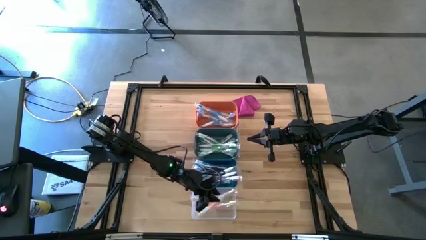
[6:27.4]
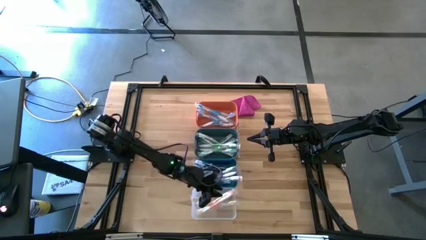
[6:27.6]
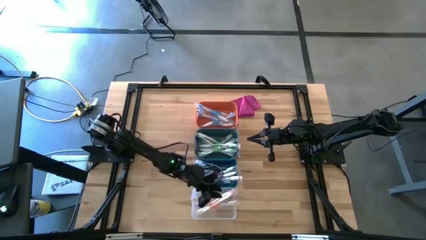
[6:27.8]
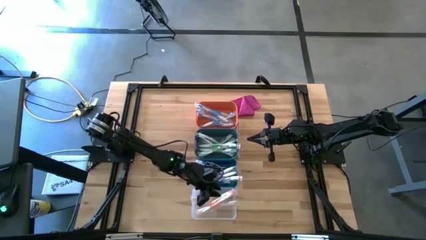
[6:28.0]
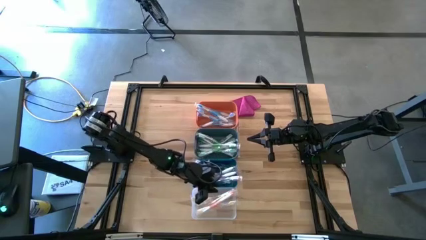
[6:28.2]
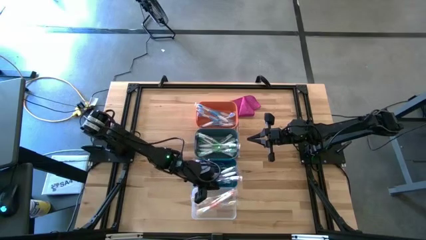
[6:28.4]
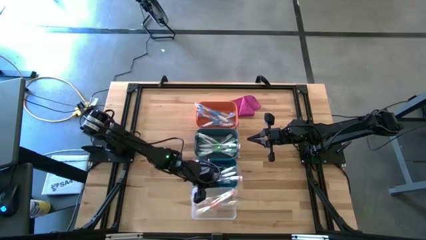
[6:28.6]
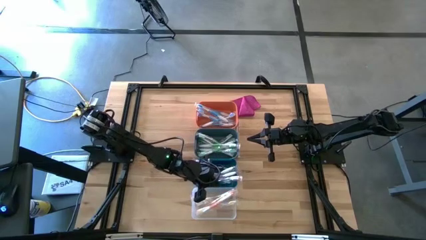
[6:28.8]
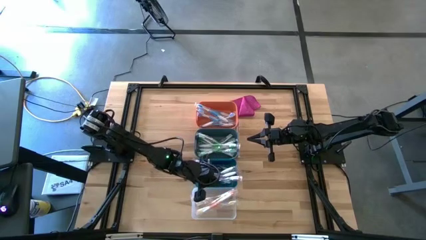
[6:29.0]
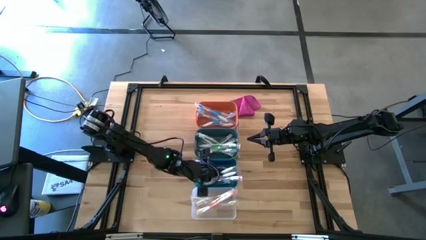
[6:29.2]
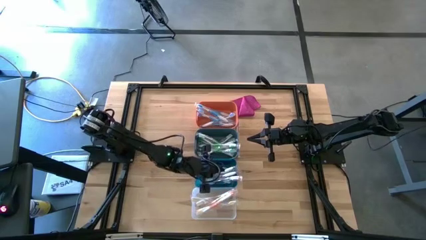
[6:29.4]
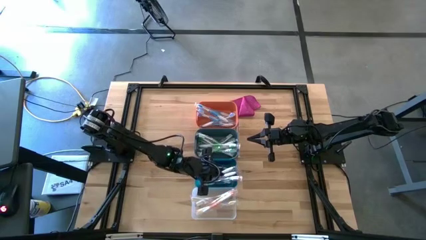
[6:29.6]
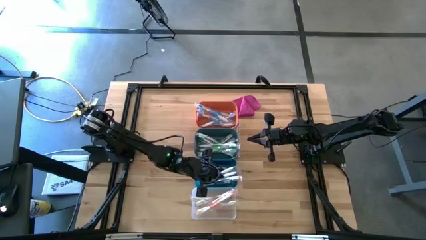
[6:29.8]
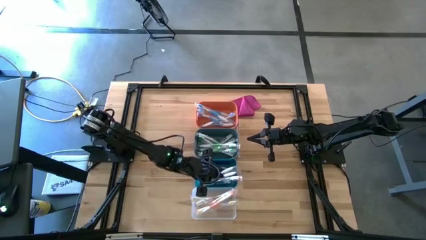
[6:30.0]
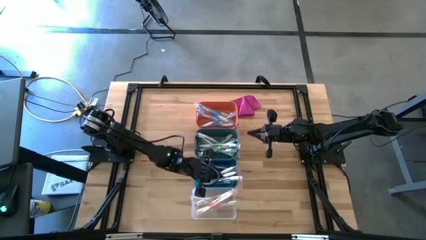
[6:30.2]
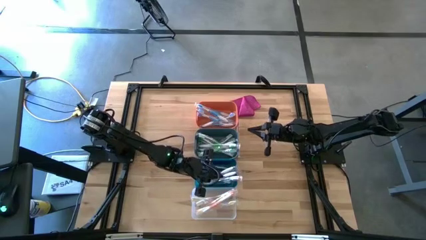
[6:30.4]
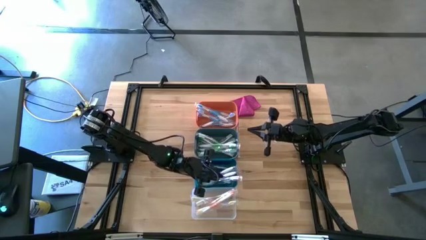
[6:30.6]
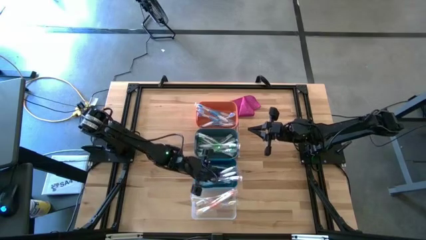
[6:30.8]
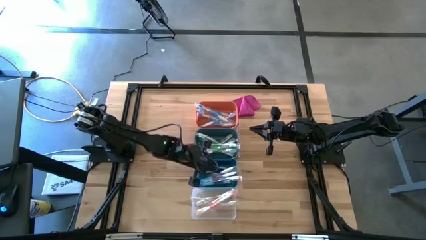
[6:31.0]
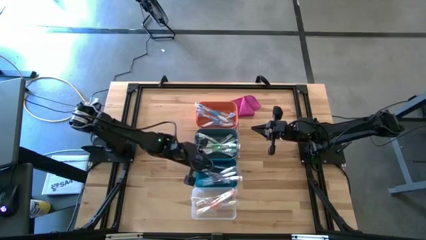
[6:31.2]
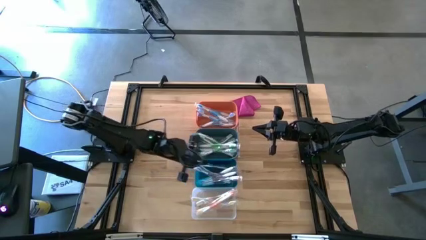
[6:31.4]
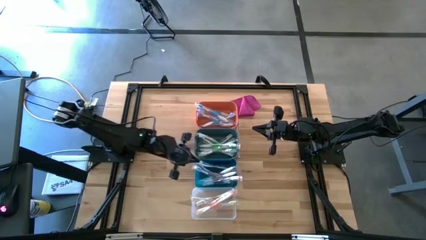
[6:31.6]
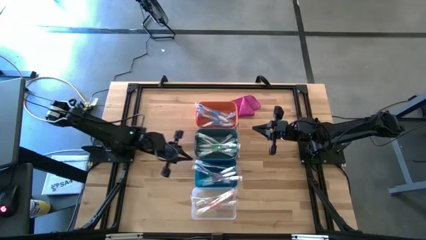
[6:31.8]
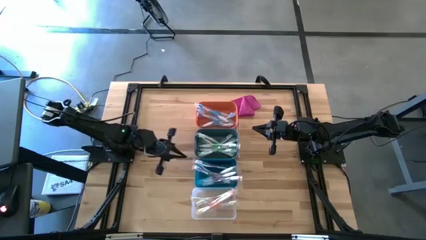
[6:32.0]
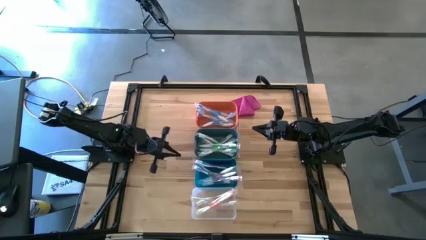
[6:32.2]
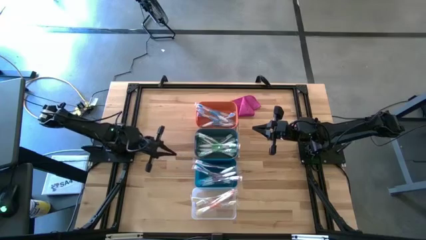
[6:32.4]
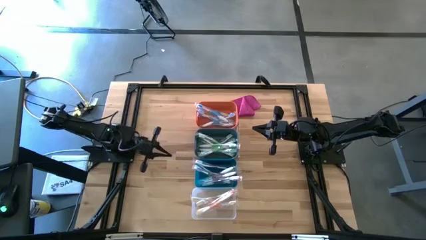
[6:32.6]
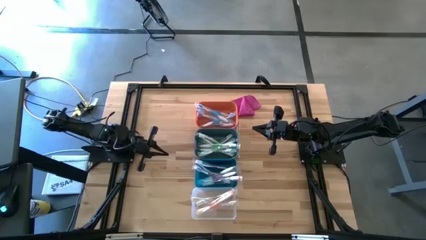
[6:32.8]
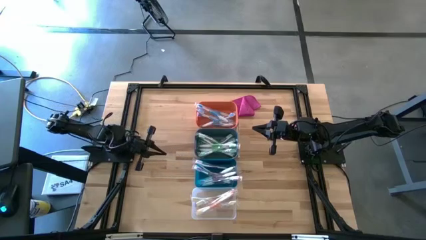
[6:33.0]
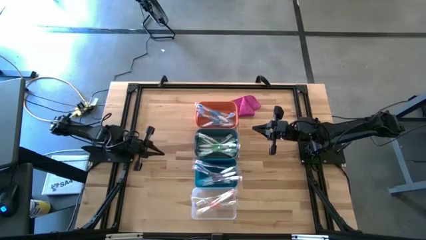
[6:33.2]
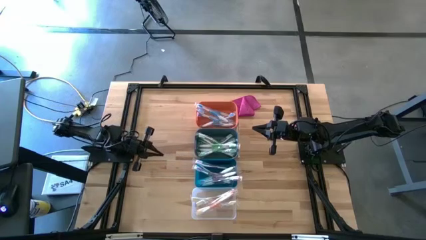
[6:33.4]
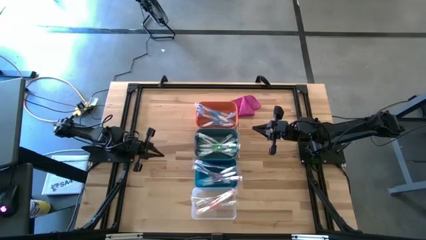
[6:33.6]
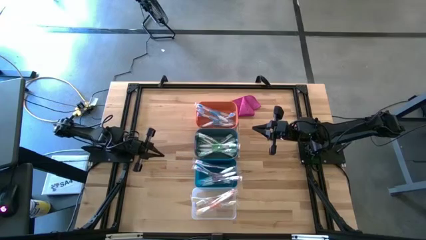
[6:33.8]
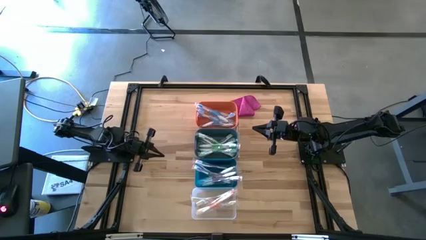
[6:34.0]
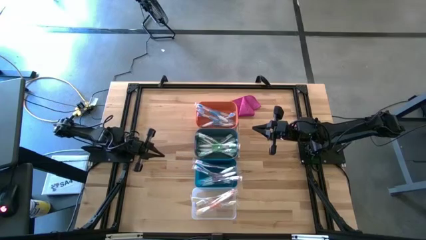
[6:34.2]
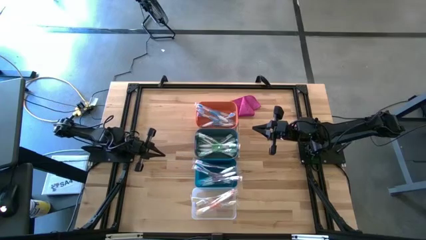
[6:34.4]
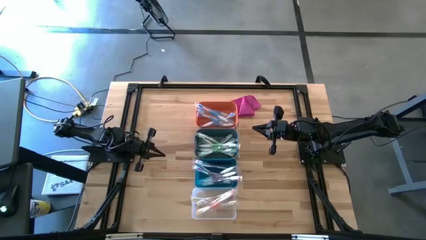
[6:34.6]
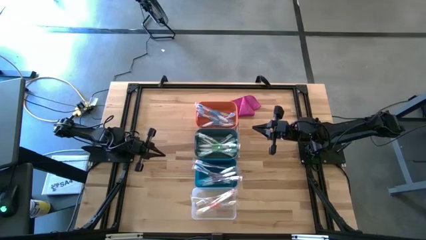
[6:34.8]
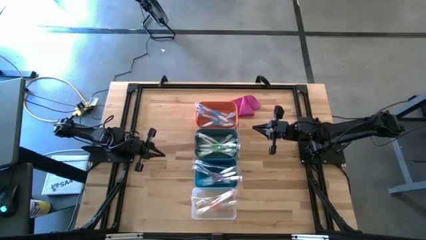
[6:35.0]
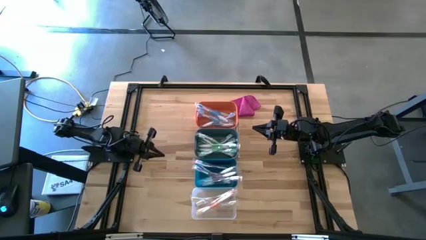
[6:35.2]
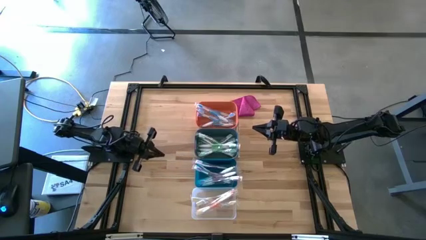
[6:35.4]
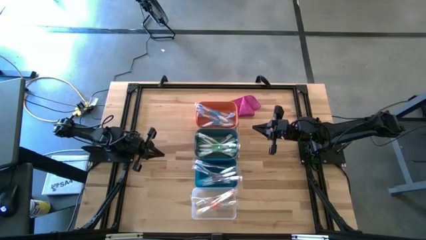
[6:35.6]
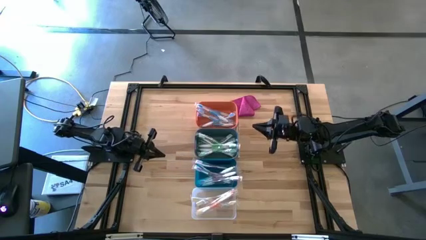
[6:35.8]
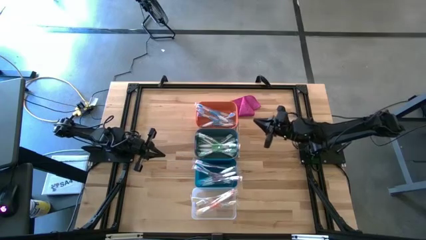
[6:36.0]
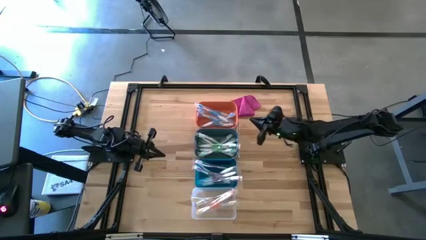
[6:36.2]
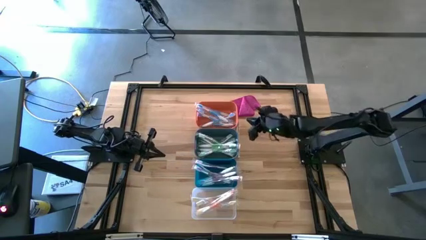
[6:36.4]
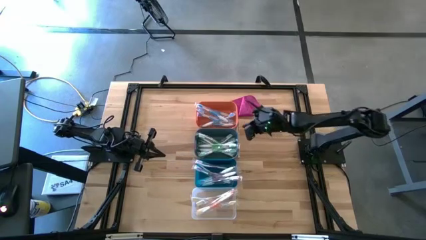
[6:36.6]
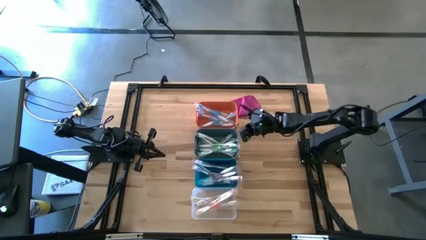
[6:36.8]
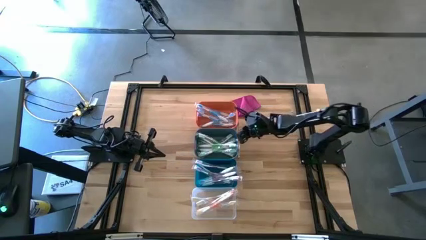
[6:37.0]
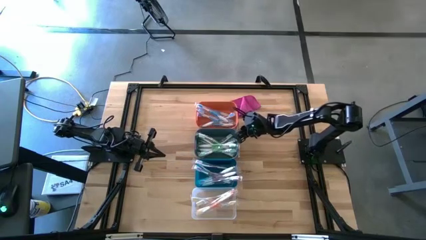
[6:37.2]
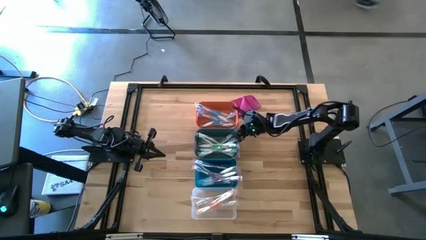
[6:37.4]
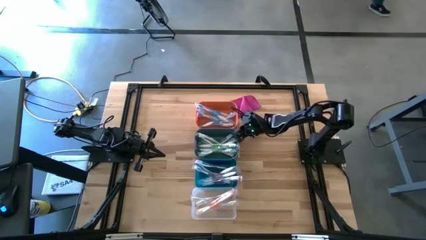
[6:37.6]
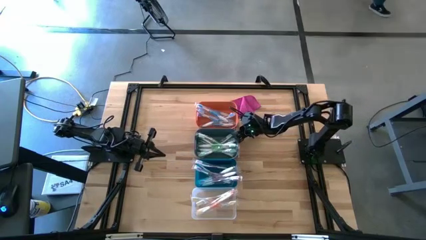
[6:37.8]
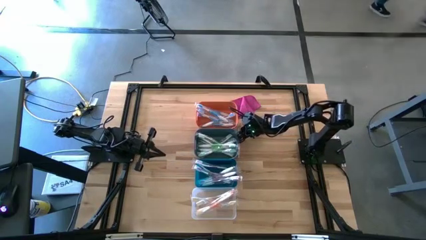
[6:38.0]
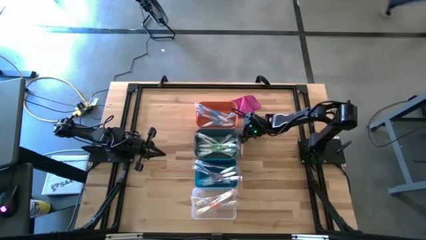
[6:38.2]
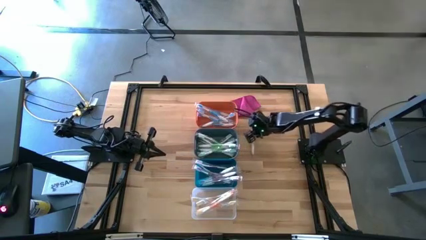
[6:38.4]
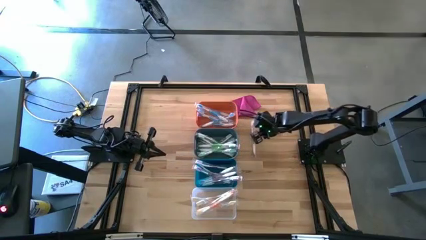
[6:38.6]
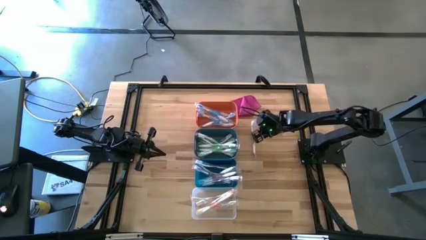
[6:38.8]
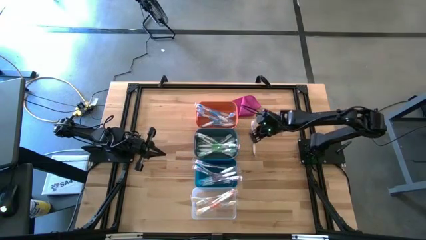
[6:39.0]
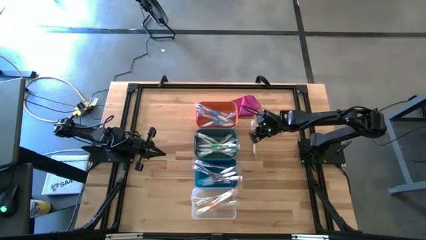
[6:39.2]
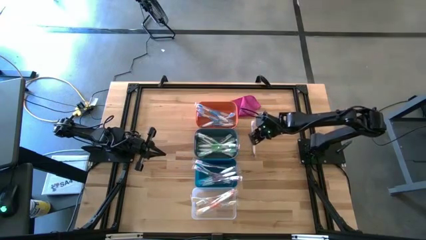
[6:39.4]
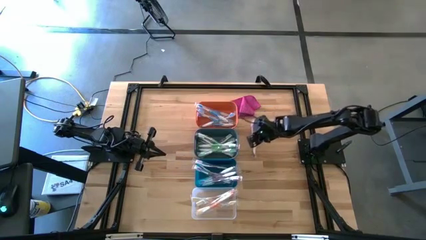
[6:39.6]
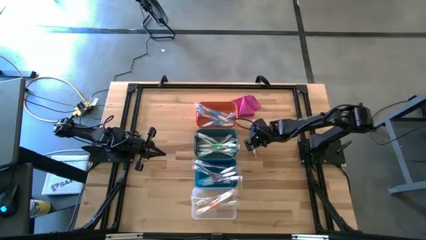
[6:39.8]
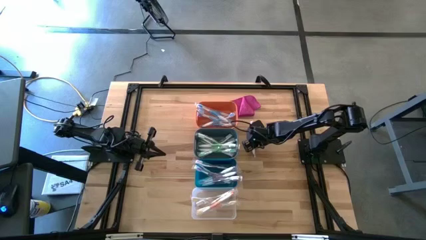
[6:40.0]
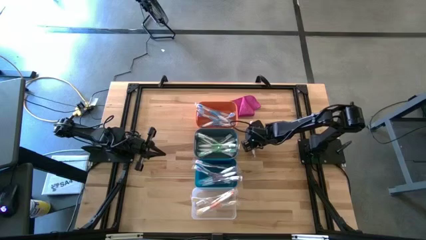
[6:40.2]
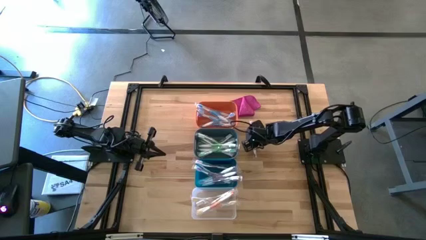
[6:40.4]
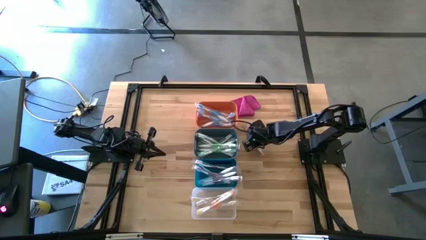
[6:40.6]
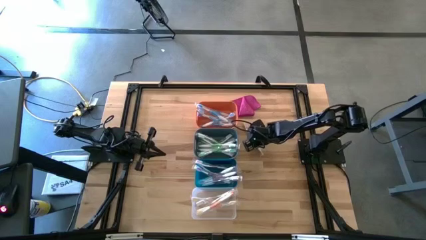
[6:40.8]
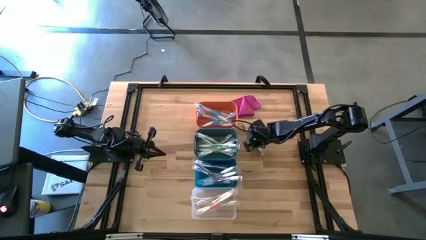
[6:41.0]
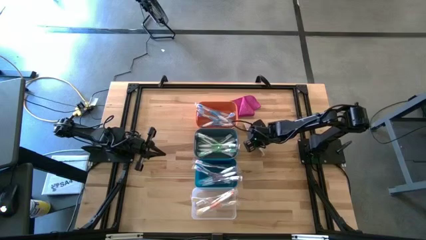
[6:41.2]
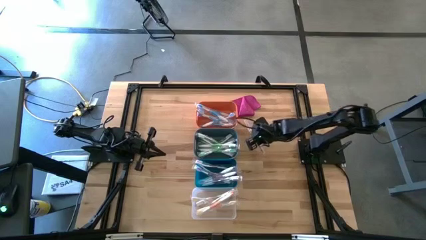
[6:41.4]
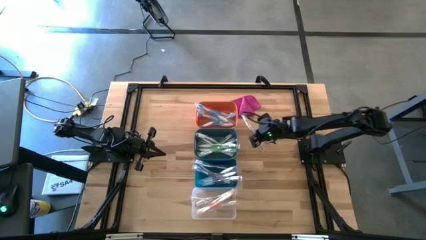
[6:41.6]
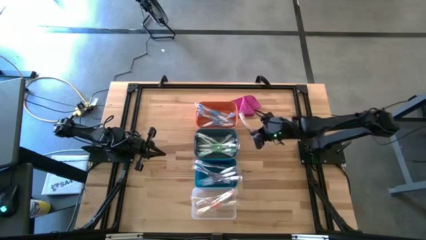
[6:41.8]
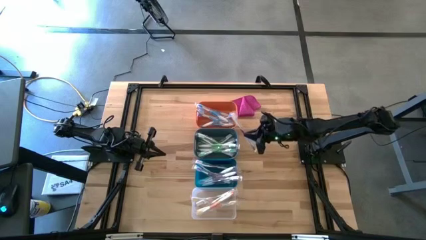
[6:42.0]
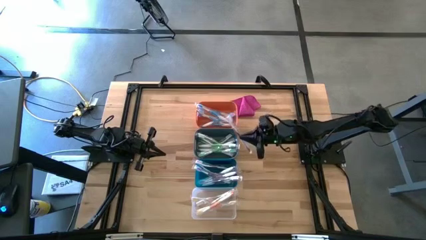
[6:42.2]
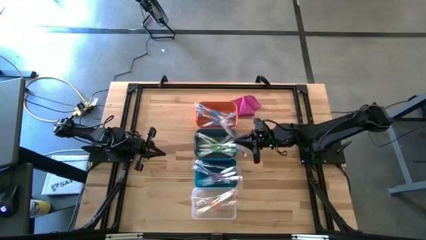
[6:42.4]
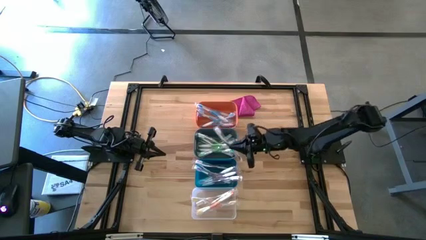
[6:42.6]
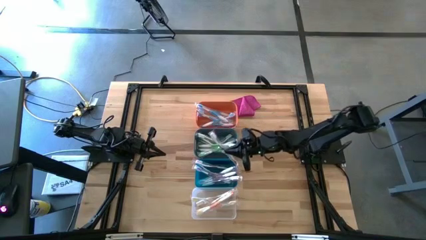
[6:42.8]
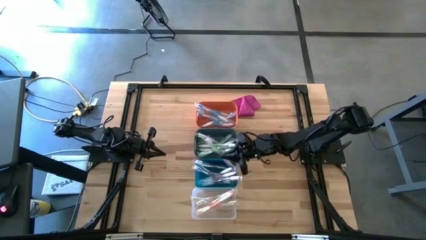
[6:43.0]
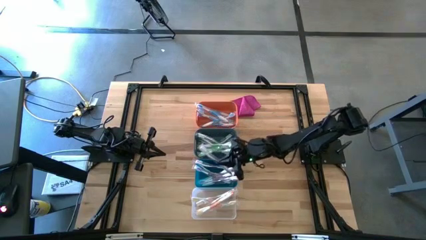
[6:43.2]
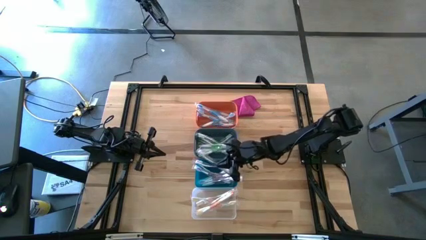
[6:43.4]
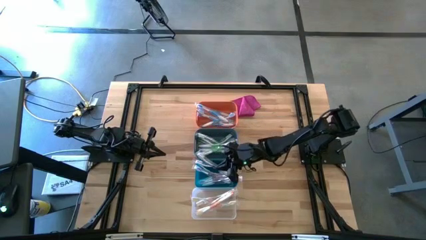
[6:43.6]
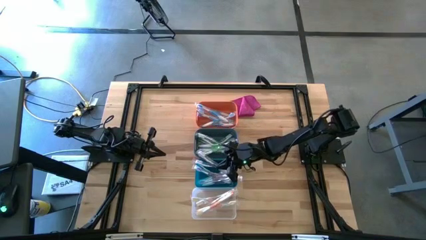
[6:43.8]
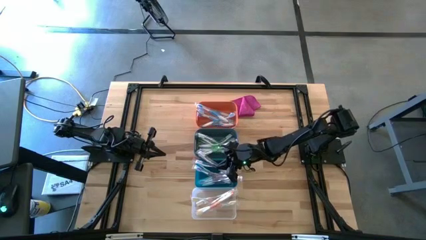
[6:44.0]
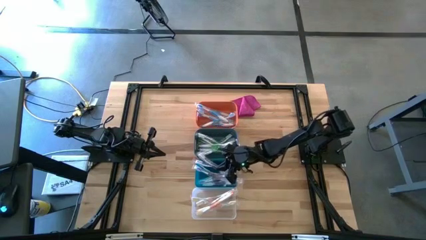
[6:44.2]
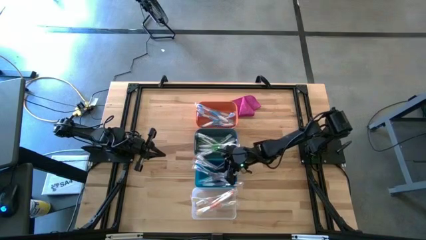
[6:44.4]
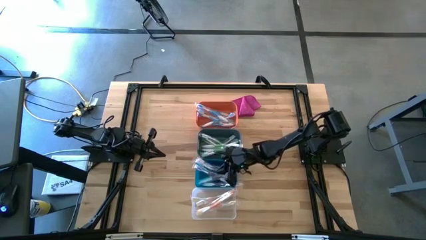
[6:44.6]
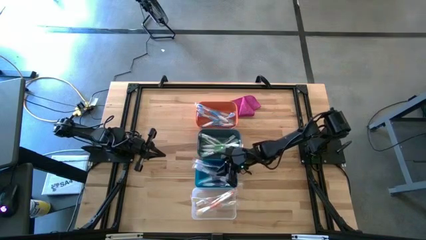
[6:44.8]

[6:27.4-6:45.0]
Task: Pick & Place Toothbrushes
Put the purple toothbrush into the blue bin
